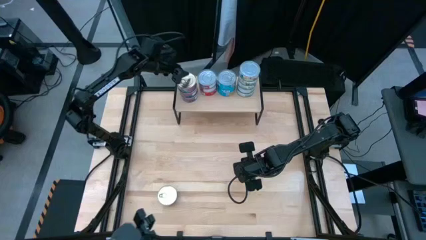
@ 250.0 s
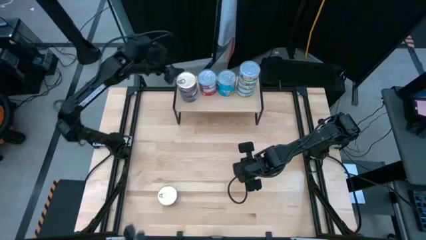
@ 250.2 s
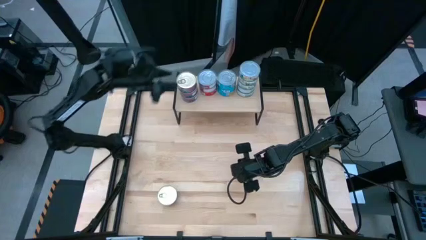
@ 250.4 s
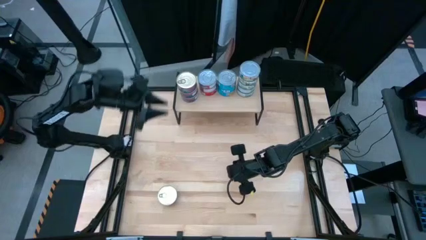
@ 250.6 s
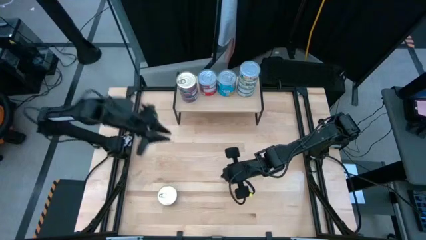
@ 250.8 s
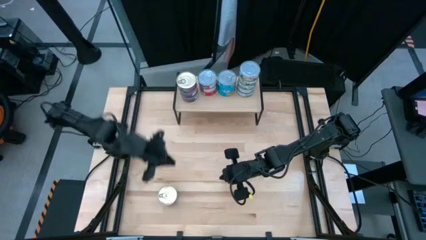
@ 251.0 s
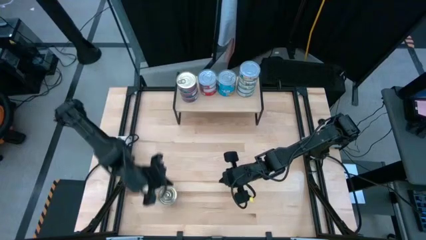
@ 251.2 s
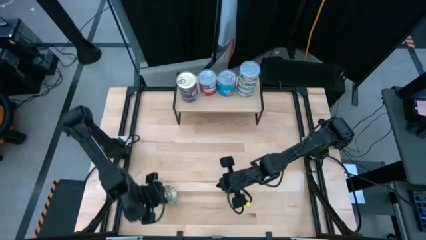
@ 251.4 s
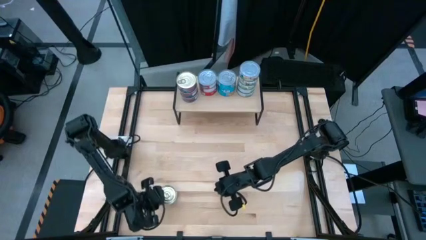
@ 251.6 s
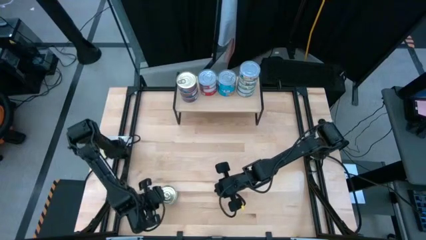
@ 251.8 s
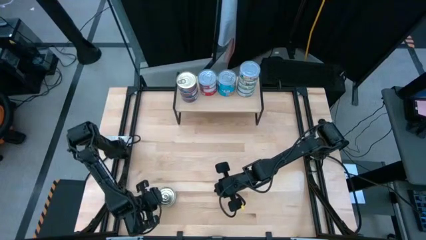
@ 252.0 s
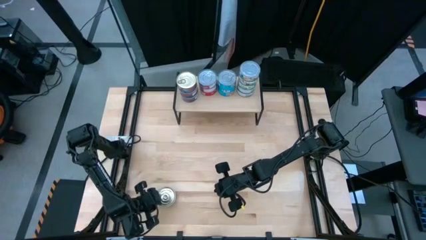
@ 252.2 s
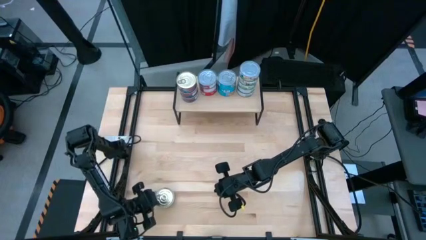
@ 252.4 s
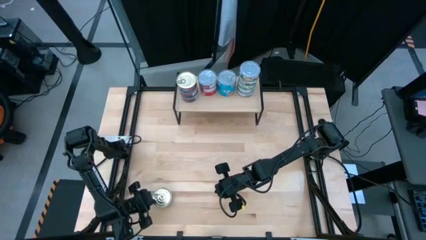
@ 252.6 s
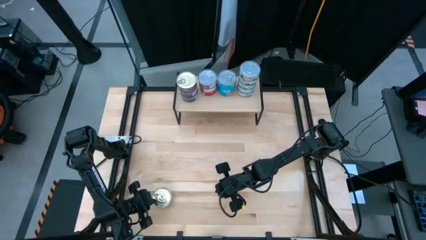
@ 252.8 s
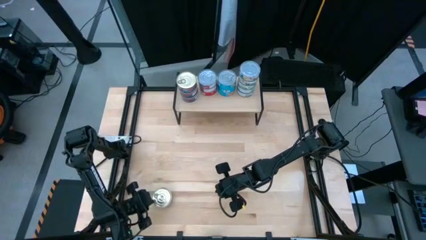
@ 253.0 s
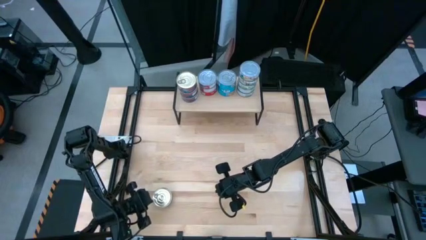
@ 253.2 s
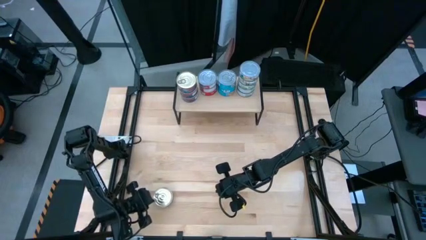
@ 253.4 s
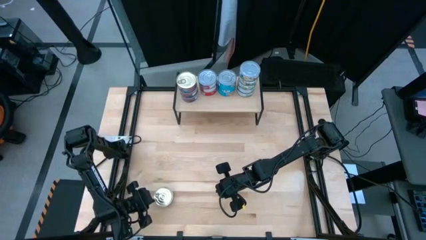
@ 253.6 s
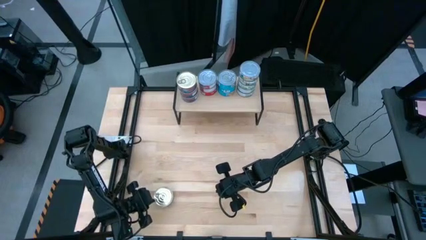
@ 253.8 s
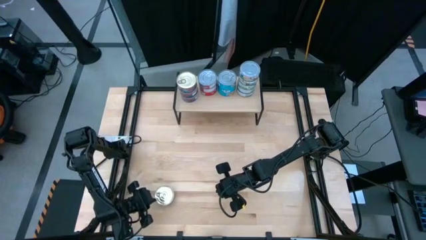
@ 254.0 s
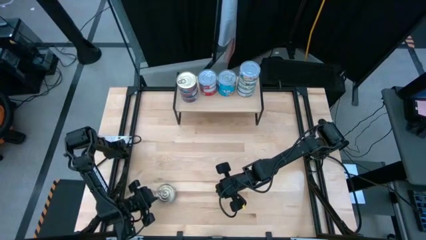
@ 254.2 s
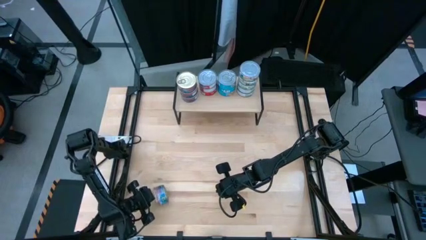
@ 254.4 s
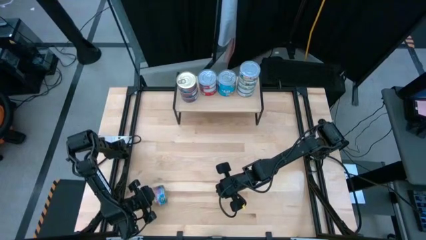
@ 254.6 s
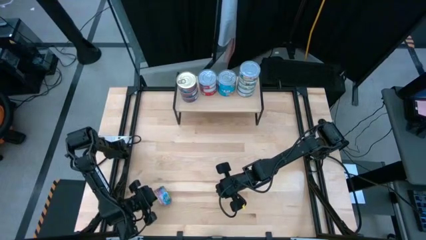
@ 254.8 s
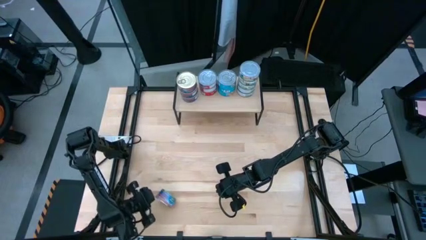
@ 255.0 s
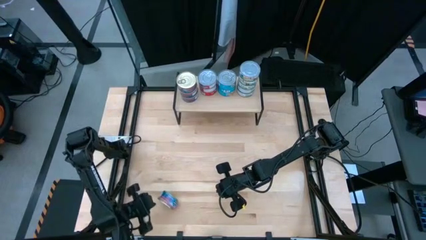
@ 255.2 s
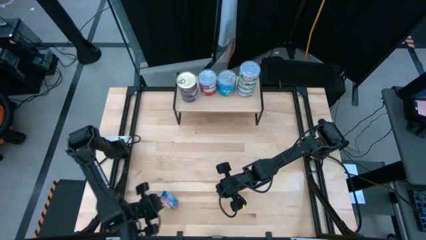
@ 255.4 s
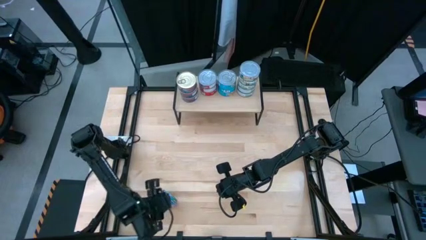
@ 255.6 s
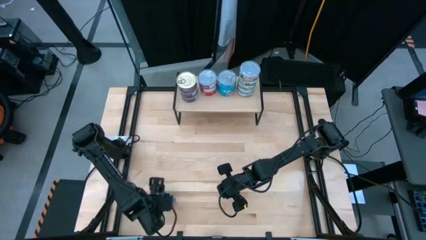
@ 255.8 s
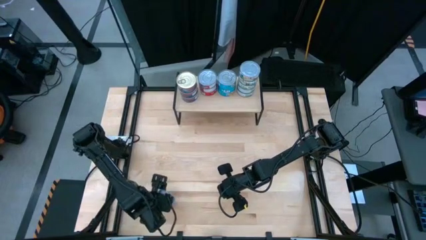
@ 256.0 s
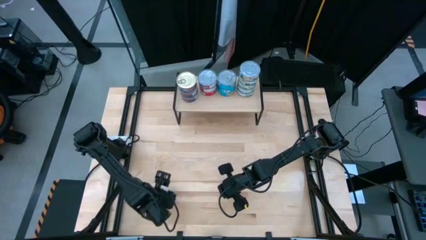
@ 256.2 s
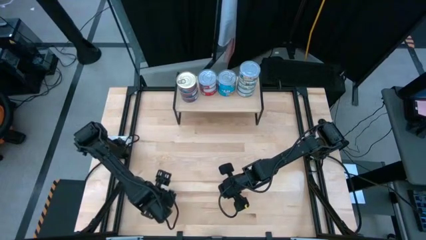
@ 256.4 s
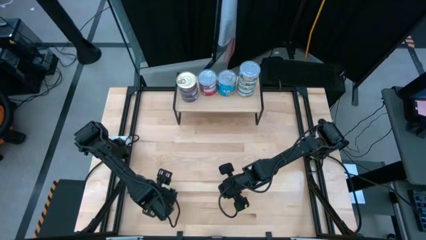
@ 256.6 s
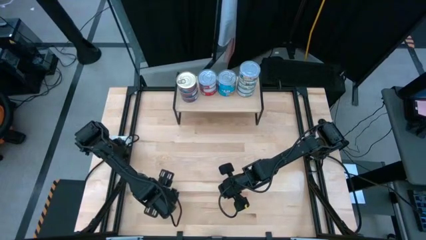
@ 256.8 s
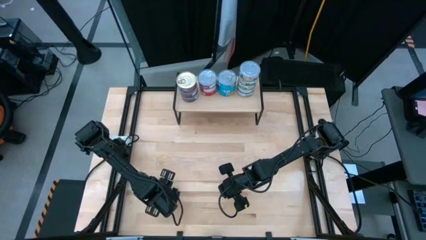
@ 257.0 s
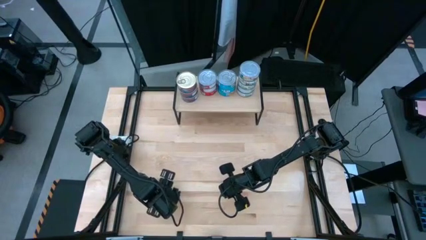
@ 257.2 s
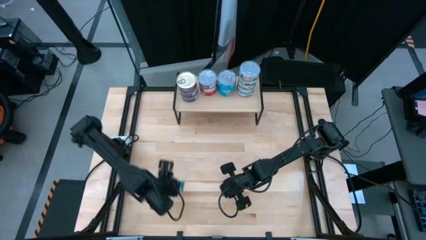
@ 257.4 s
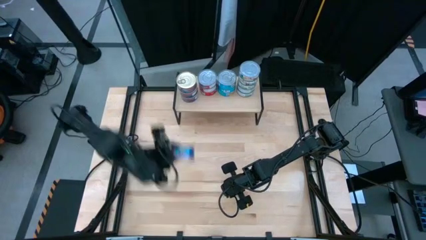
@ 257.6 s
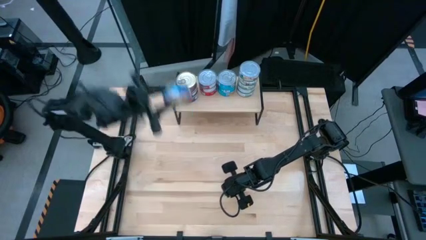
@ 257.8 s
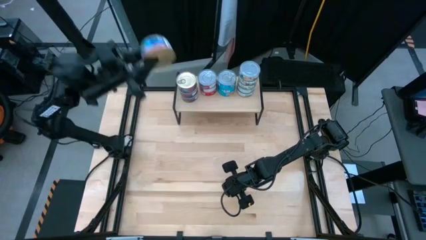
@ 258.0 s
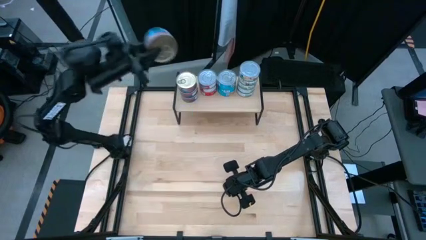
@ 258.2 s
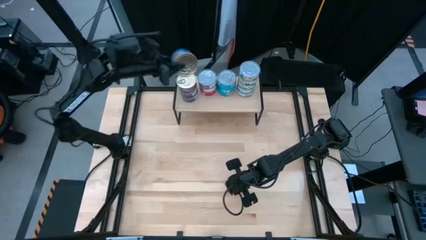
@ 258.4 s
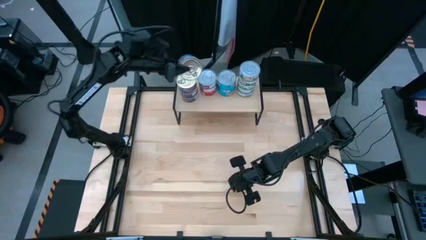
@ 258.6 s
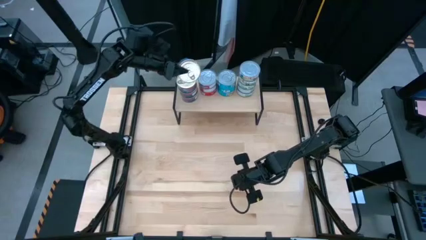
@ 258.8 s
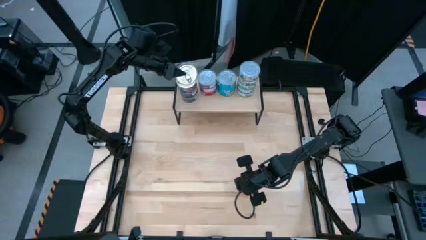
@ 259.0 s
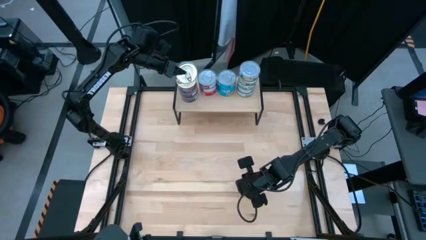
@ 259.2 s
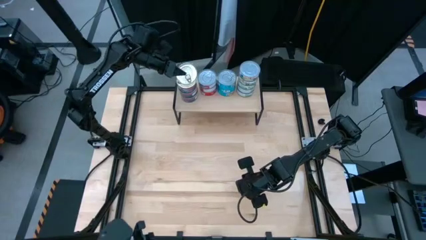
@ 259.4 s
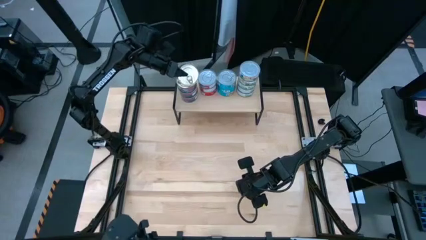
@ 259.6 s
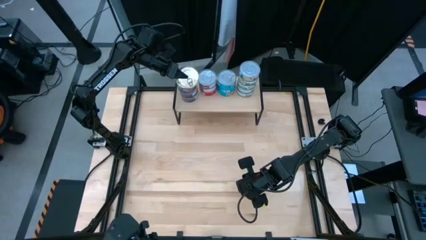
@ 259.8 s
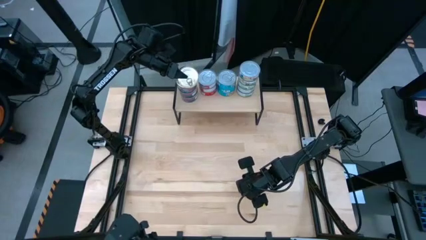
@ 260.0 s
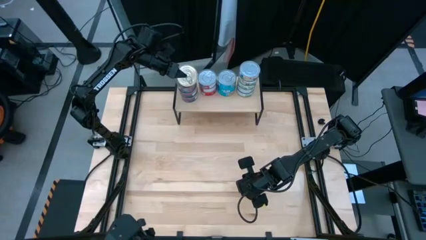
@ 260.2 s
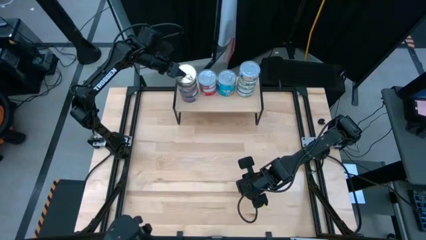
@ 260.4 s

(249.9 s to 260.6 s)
Task: Stack canned seafood by type on shelf
Stack the blue pink tuna can on top of the other blue tuna cans on the shelf

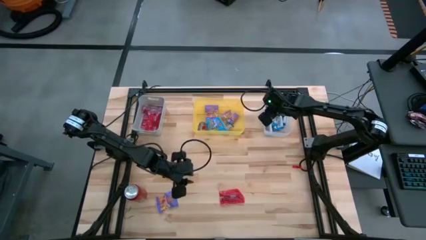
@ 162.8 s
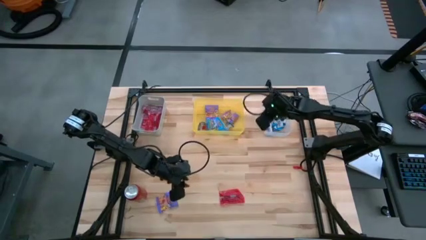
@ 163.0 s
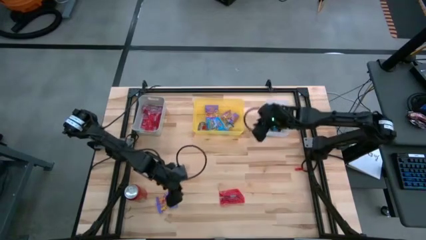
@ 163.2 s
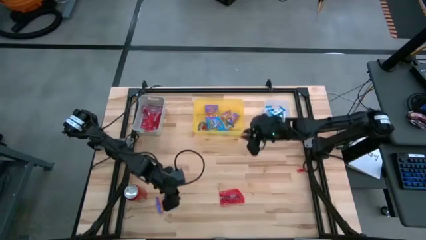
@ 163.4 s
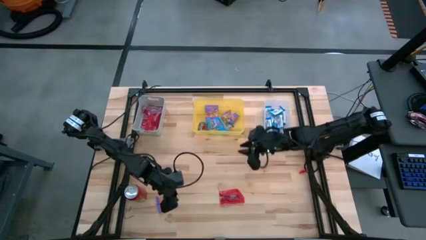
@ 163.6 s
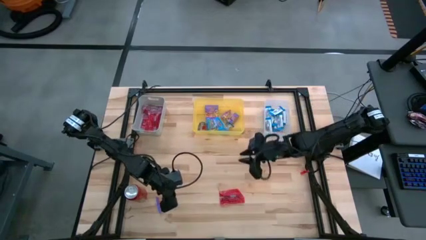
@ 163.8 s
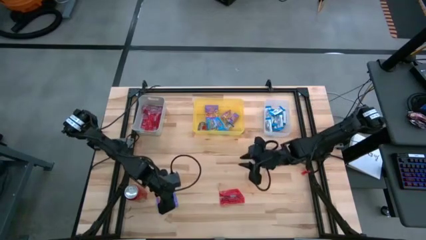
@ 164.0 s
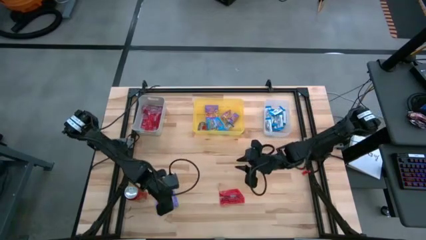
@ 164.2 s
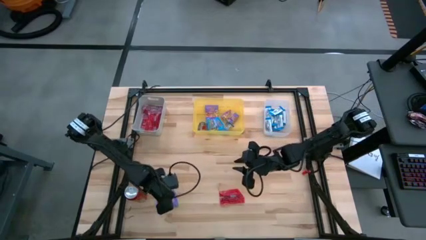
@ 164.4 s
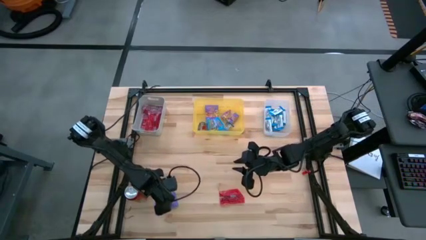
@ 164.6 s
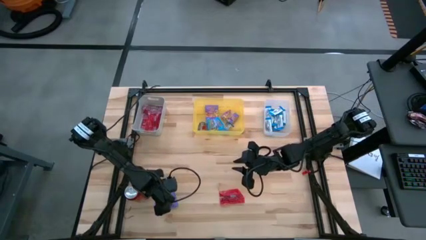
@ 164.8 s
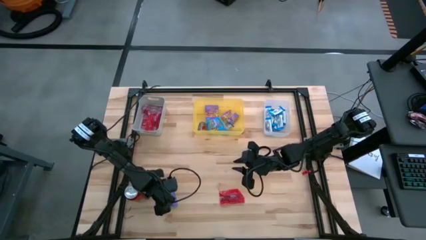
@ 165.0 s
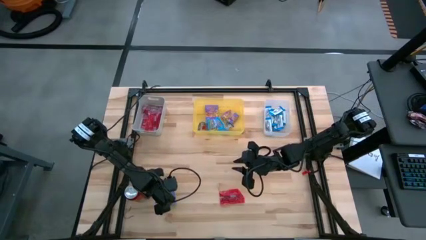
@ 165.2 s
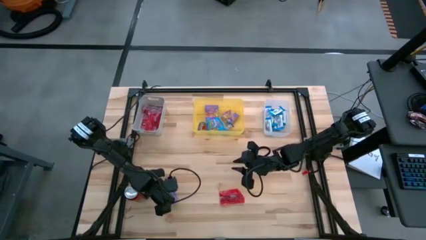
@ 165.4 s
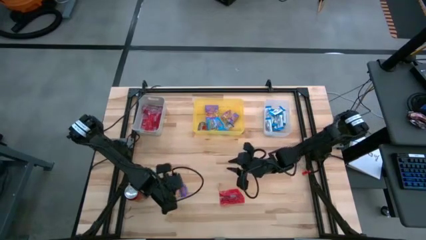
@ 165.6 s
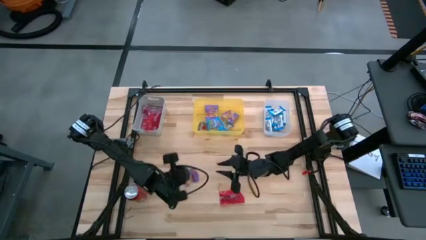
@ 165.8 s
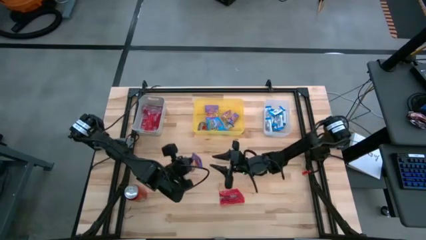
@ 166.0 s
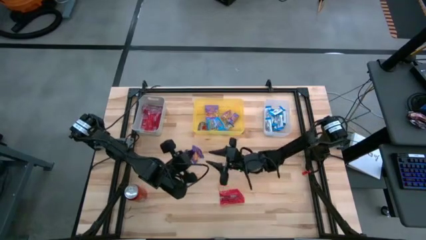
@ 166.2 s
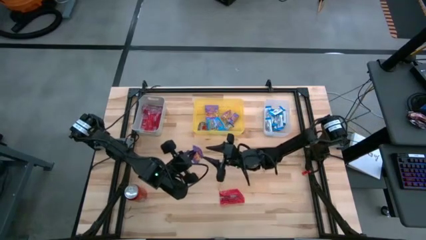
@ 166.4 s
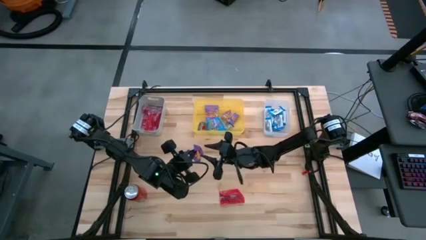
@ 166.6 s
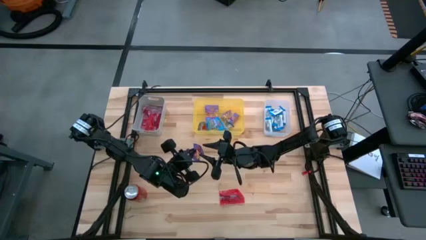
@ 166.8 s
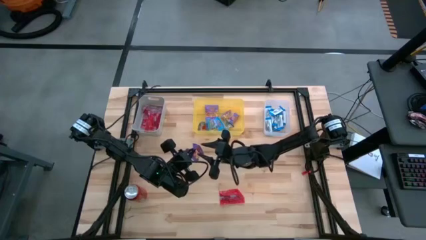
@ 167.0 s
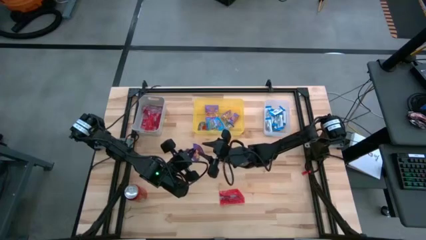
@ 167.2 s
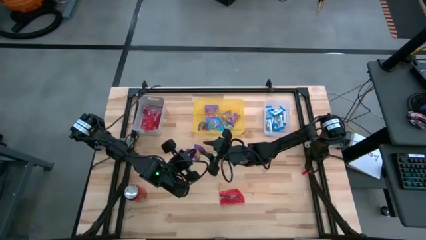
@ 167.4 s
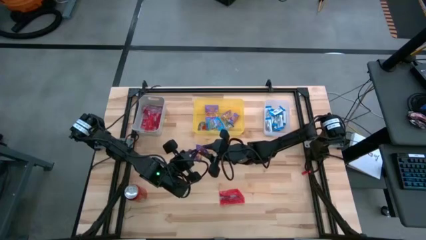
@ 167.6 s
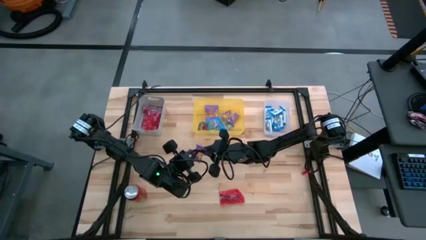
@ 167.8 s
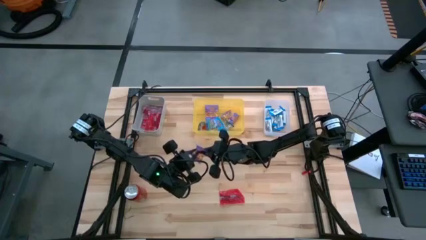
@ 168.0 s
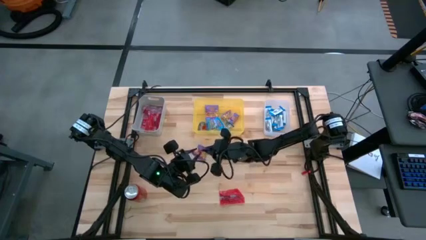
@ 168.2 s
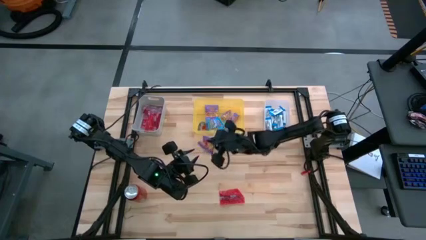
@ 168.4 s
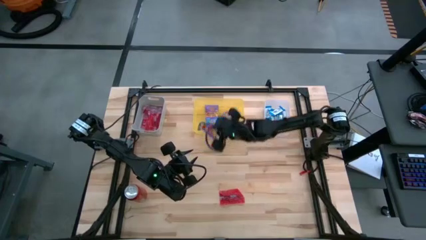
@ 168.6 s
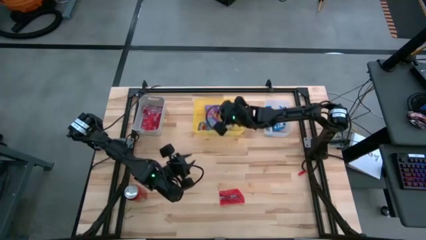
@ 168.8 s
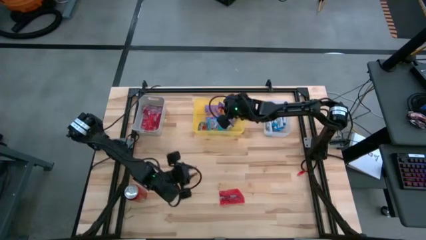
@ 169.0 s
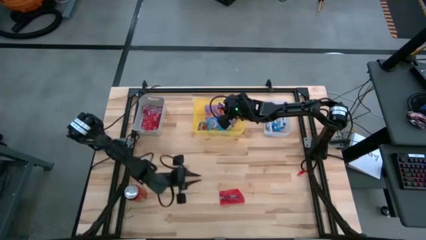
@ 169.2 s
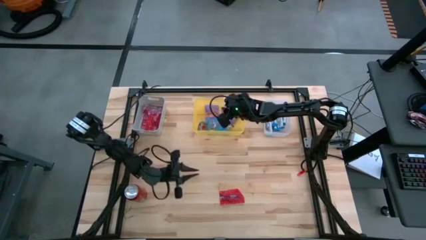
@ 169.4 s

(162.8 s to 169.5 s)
Task: Sort candy
Put the violet gummy into the yellow bin
